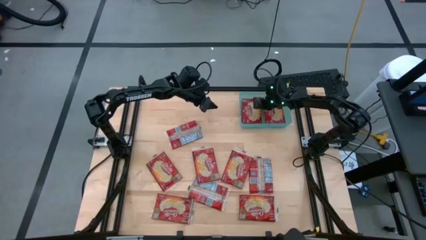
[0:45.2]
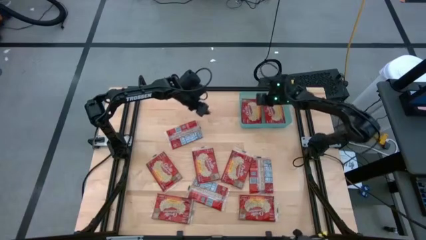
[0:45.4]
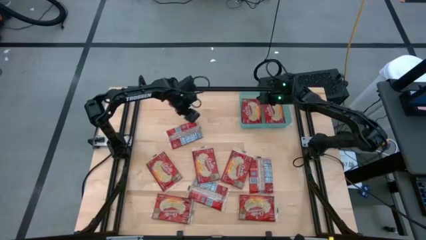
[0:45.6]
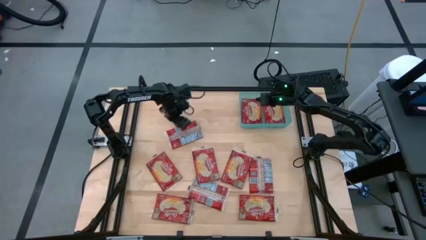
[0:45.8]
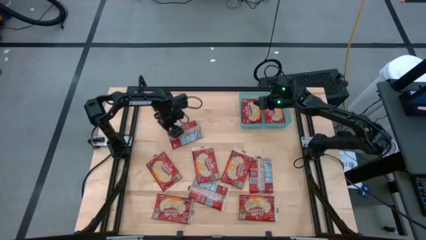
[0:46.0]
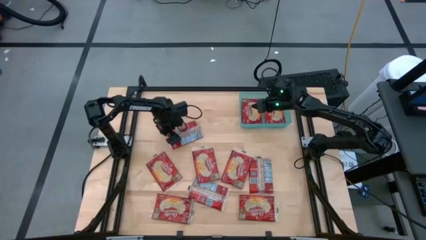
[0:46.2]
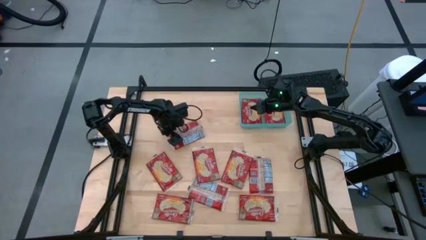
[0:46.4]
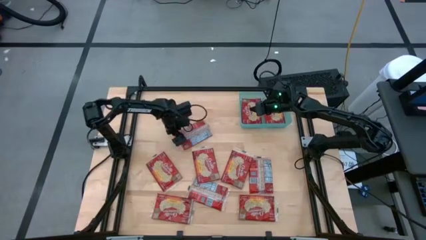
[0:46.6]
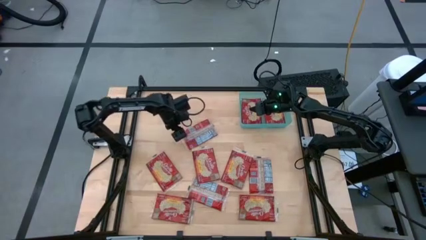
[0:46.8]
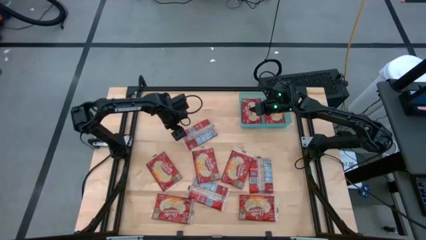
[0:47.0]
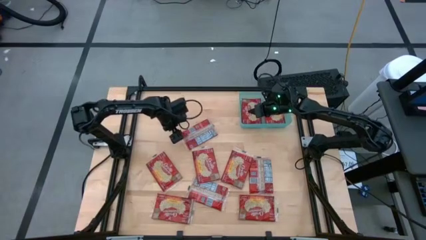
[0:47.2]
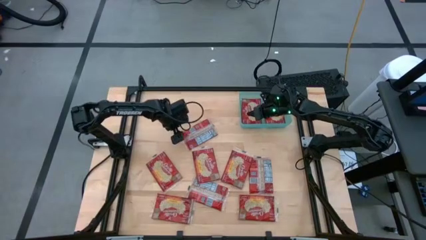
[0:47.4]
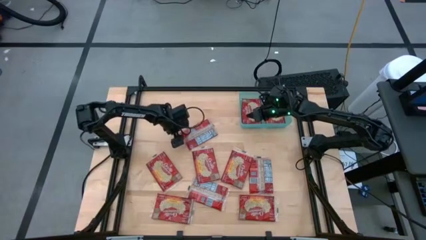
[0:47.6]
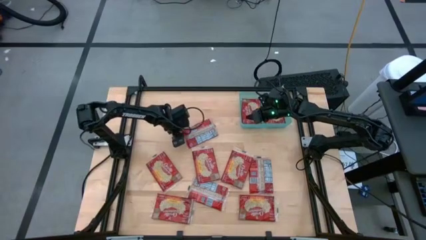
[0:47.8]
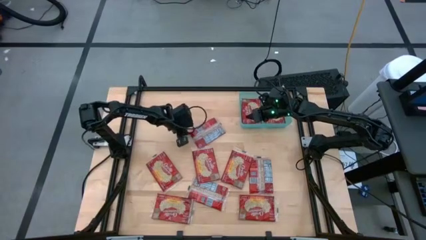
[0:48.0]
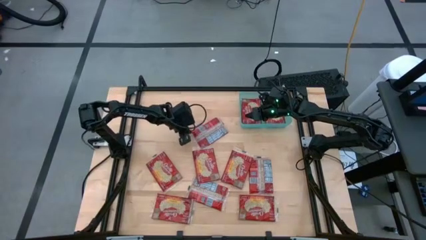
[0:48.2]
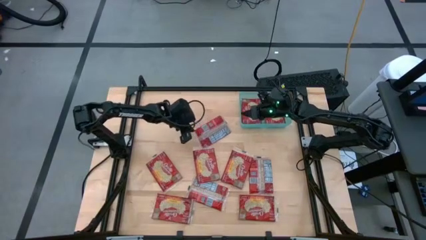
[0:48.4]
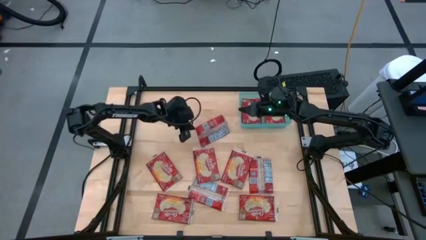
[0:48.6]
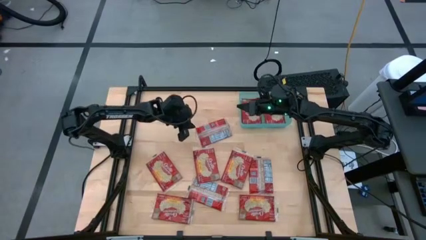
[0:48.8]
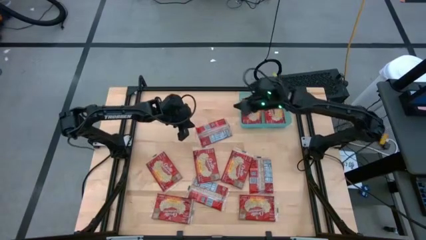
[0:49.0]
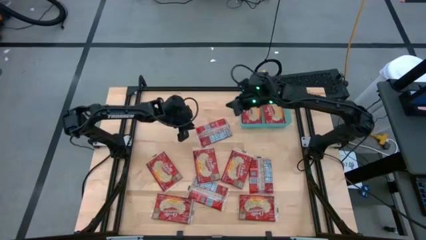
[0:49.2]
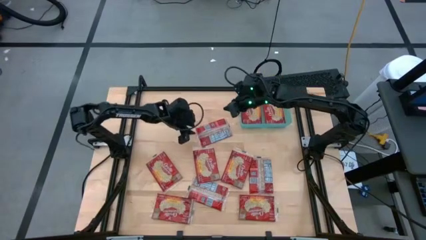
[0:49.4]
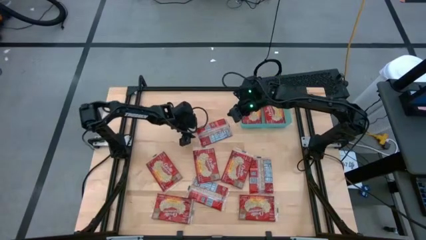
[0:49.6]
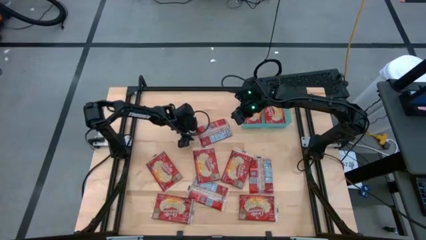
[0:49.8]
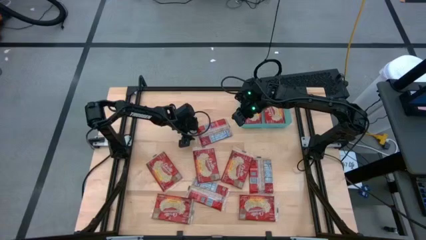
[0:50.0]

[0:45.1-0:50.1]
Task: Sort popcorn bags into baskets
Put the red popcorn bag into the light blue bin

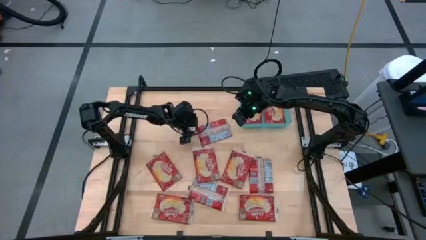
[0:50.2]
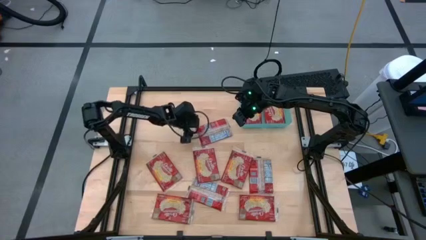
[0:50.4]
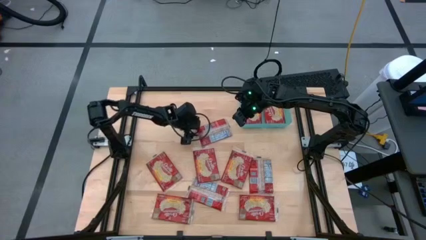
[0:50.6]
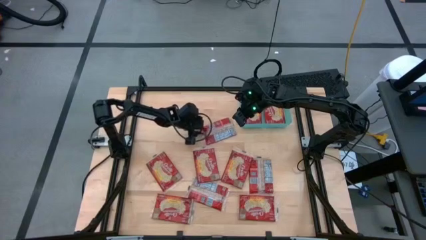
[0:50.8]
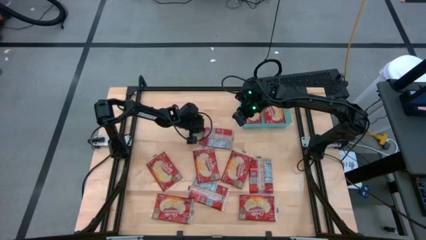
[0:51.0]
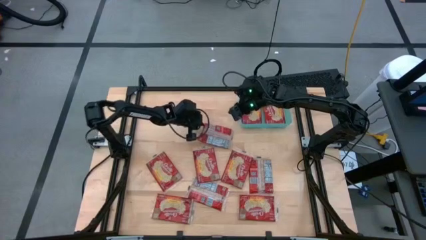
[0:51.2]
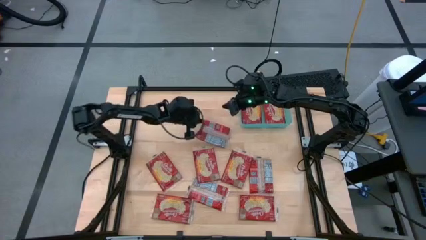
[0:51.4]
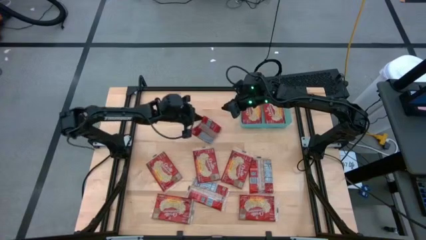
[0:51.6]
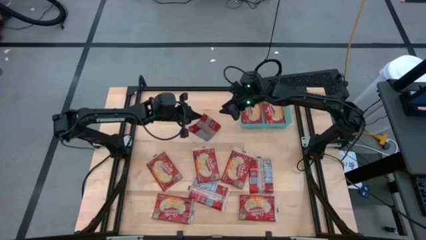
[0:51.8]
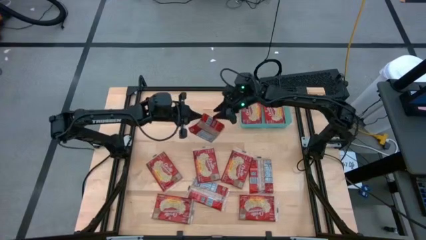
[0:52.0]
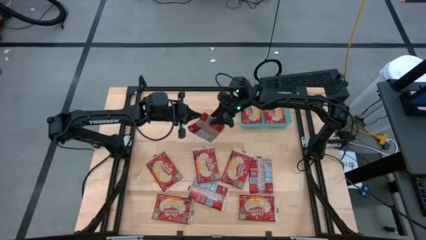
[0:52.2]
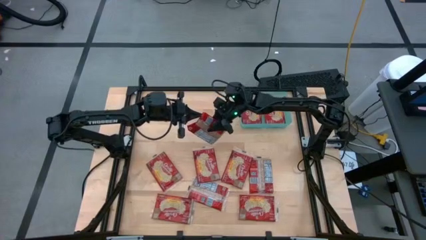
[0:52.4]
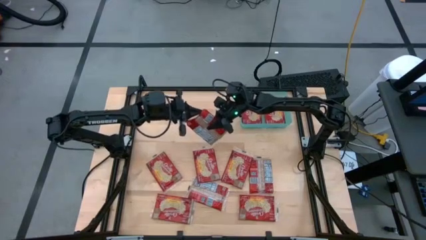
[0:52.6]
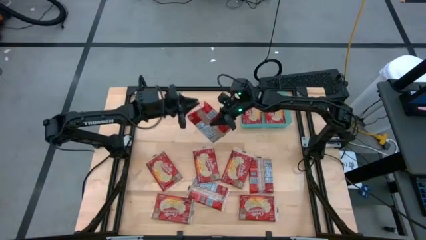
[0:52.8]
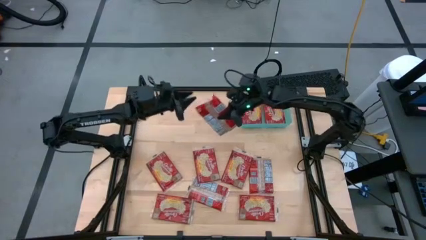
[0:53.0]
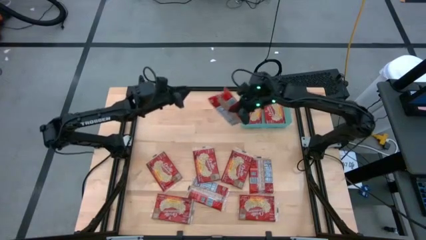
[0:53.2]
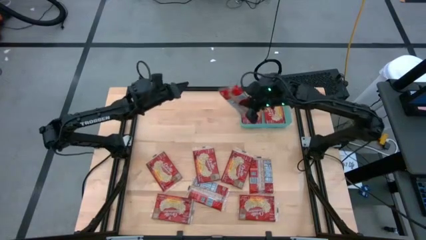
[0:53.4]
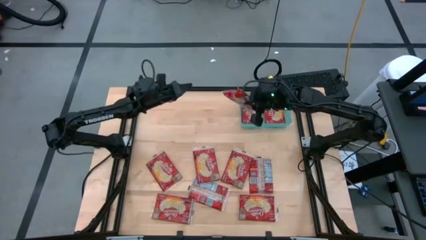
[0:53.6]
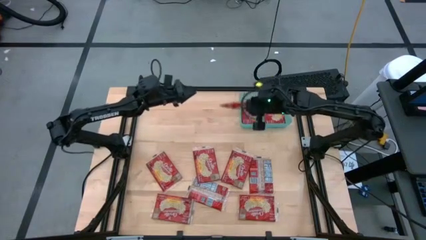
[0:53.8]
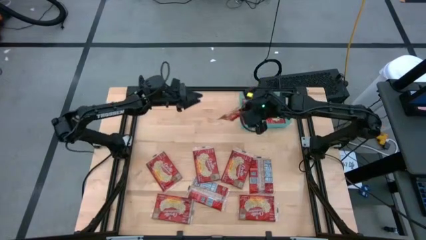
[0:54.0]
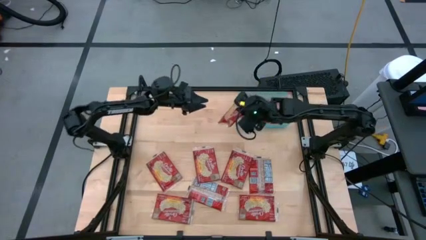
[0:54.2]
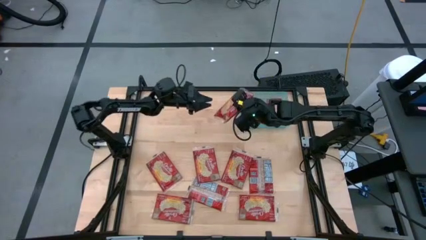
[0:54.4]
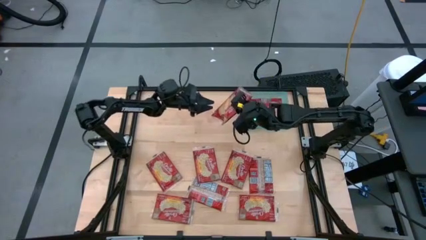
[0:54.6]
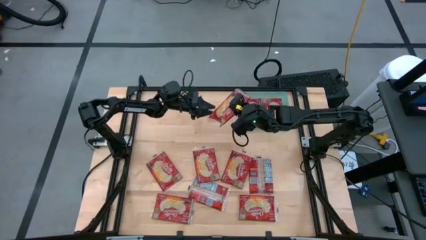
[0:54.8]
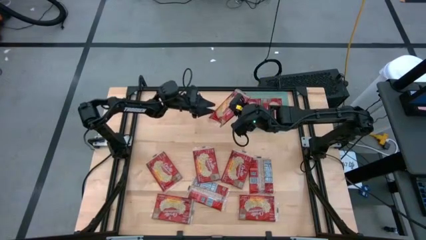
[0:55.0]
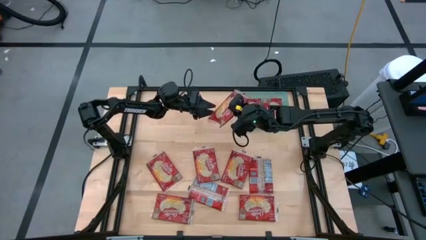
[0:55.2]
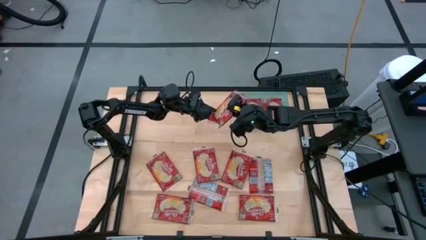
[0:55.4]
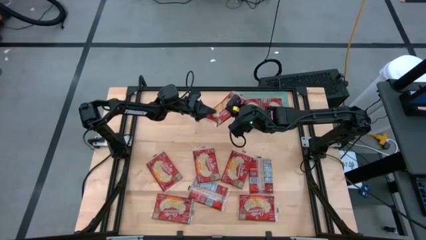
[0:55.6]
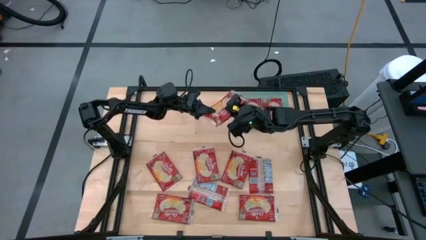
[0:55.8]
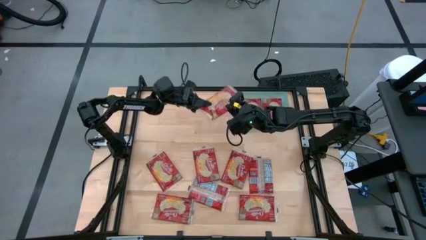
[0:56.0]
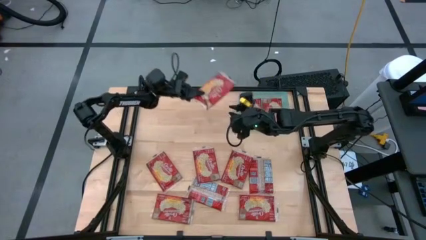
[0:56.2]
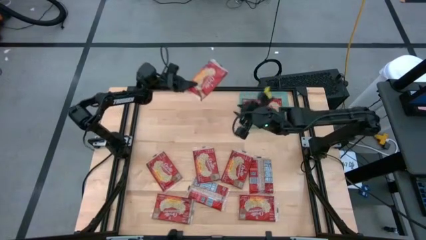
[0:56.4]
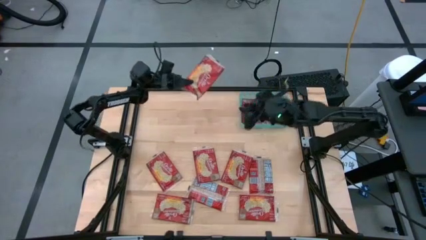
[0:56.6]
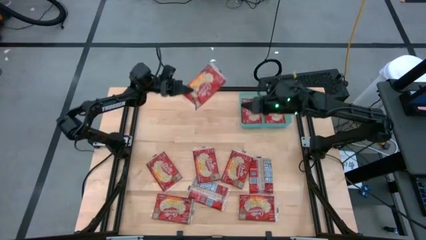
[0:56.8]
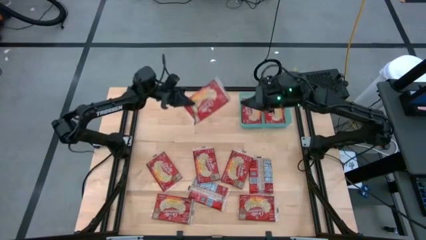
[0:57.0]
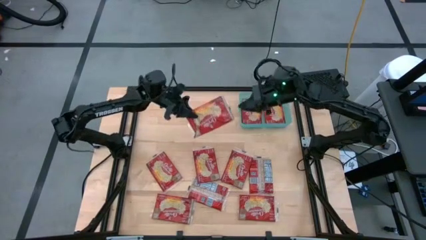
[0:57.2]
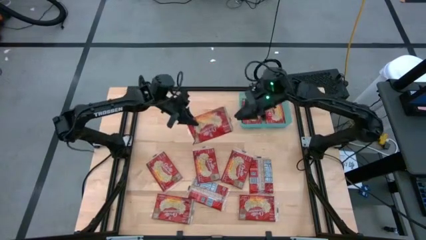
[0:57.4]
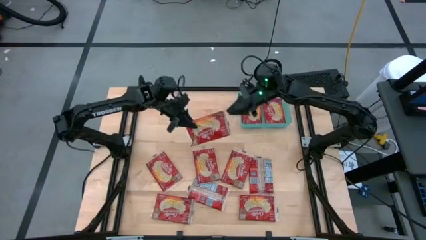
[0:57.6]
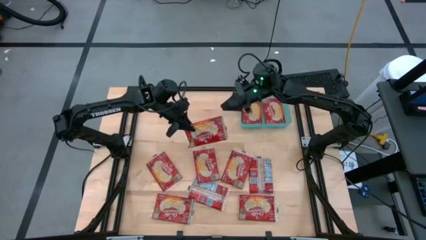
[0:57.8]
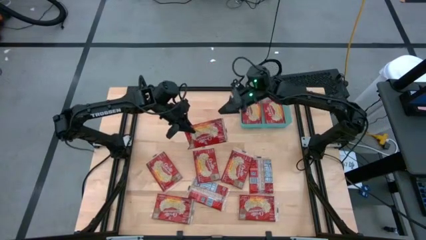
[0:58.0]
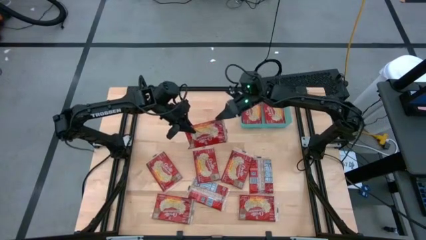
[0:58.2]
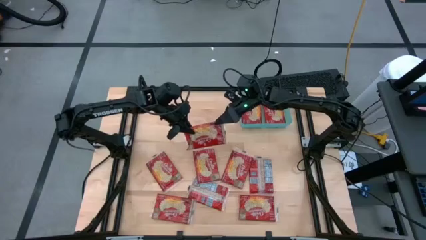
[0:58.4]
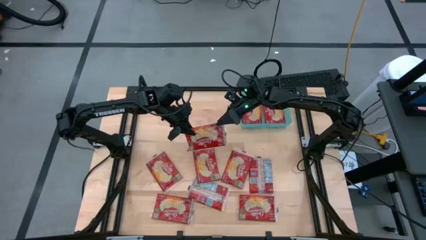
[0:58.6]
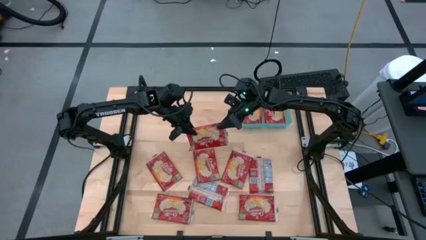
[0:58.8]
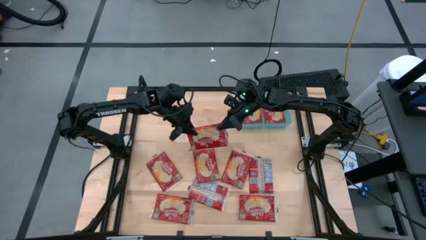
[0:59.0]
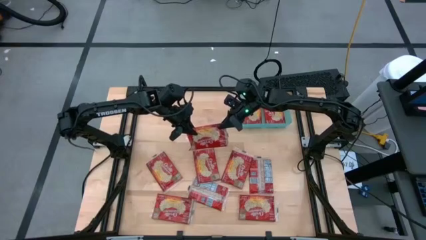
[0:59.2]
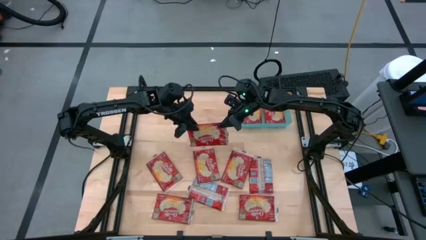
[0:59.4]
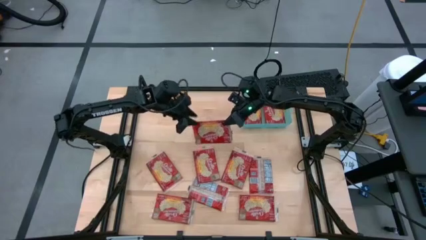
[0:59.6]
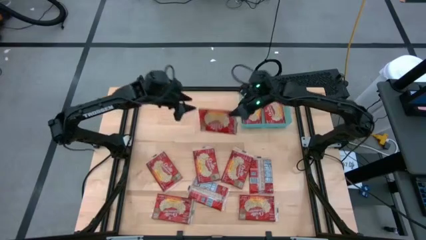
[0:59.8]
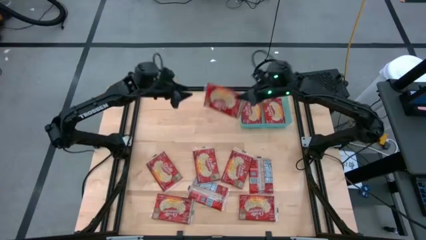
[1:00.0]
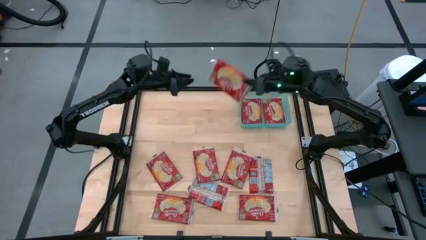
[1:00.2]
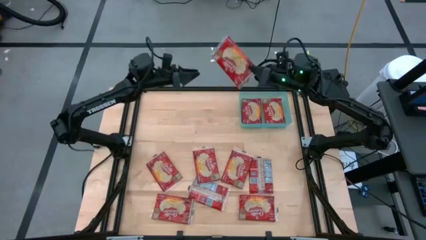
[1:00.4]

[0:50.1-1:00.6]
Put the red popcorn bag into the light blue bin
